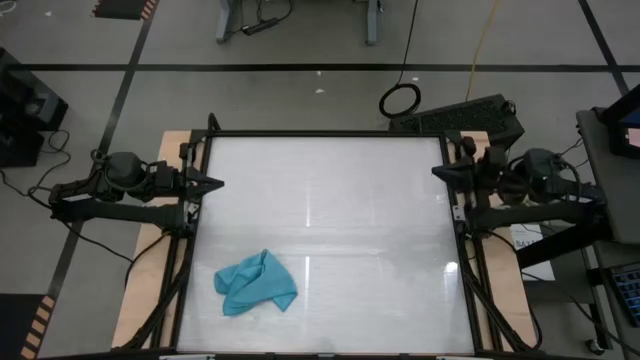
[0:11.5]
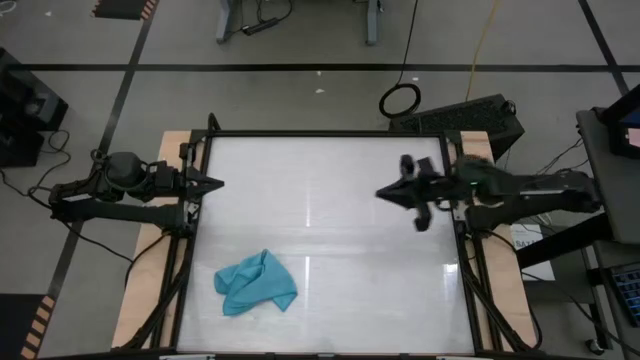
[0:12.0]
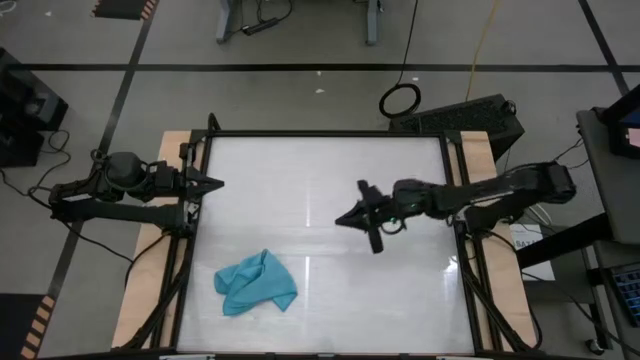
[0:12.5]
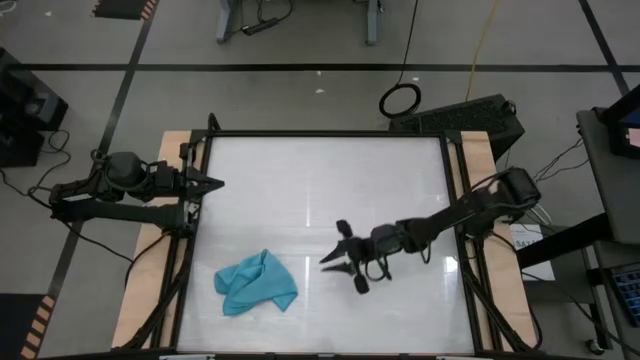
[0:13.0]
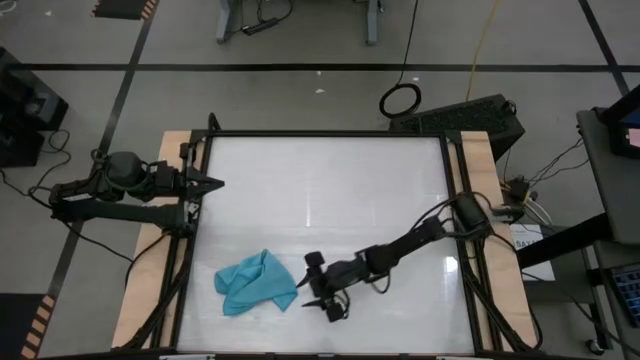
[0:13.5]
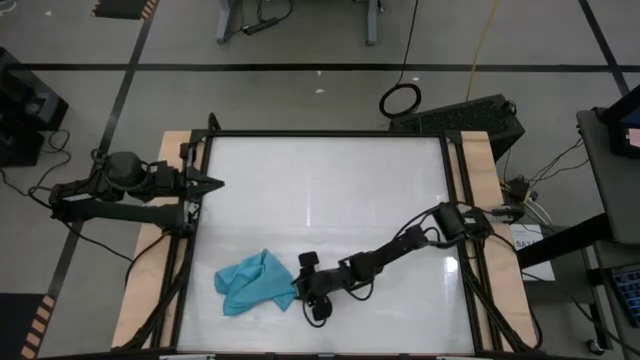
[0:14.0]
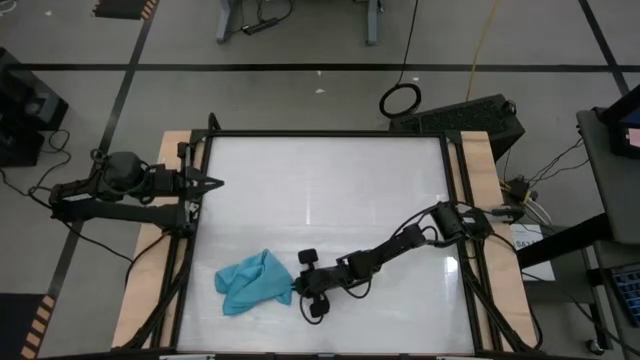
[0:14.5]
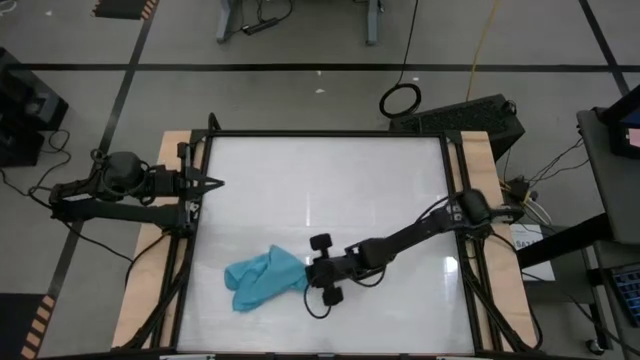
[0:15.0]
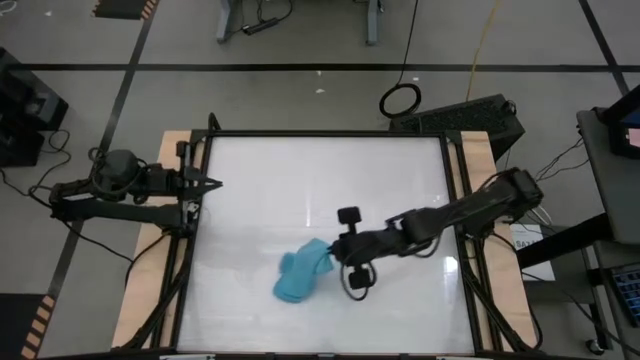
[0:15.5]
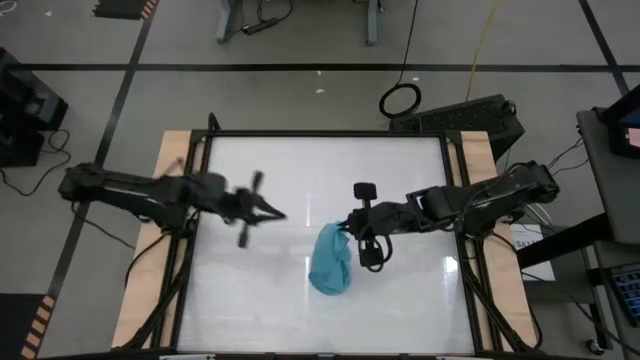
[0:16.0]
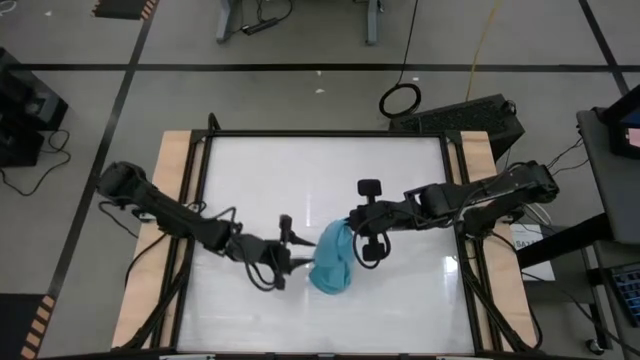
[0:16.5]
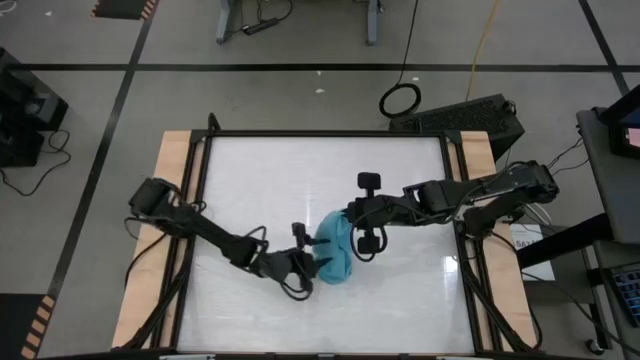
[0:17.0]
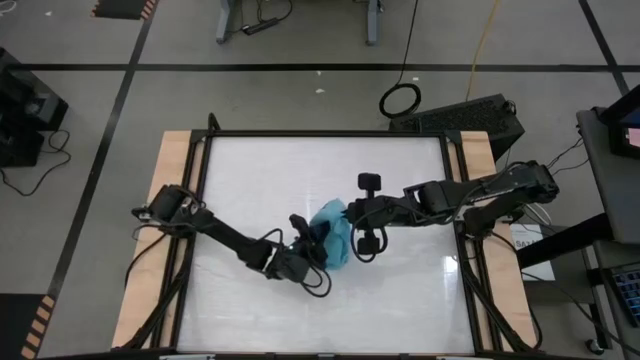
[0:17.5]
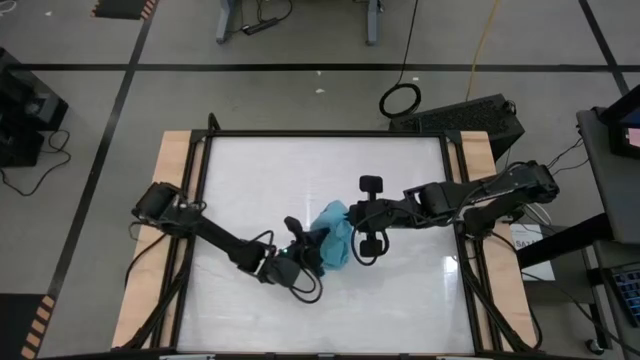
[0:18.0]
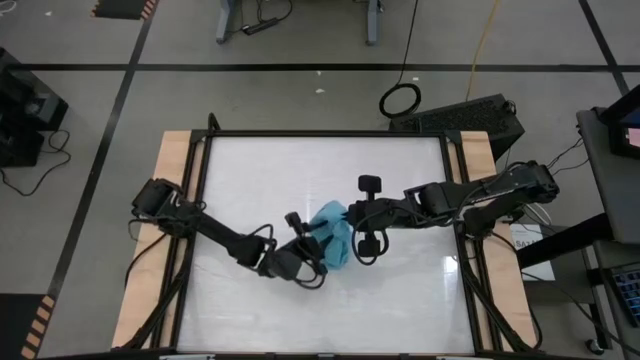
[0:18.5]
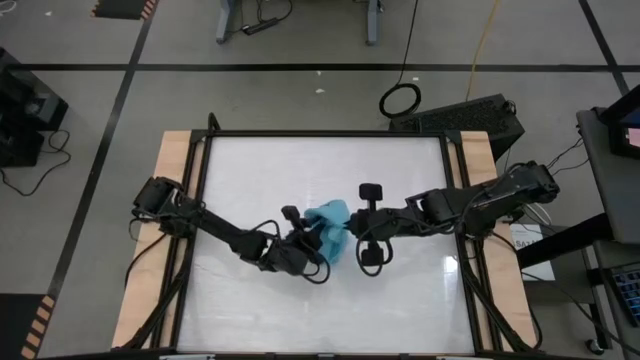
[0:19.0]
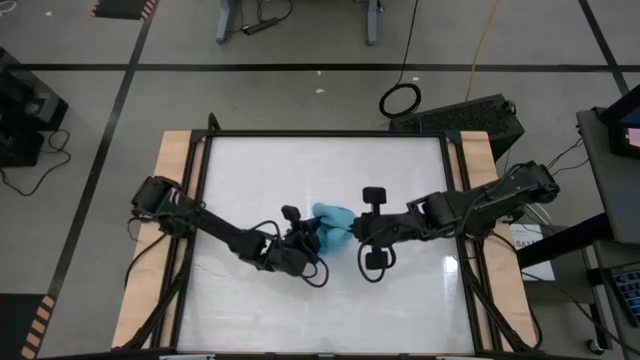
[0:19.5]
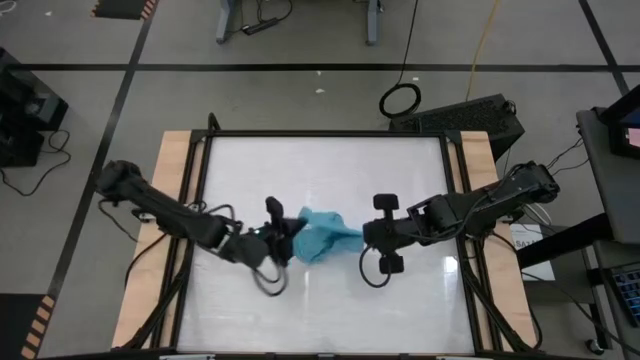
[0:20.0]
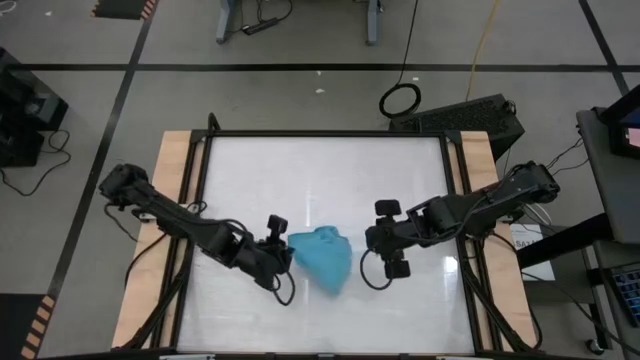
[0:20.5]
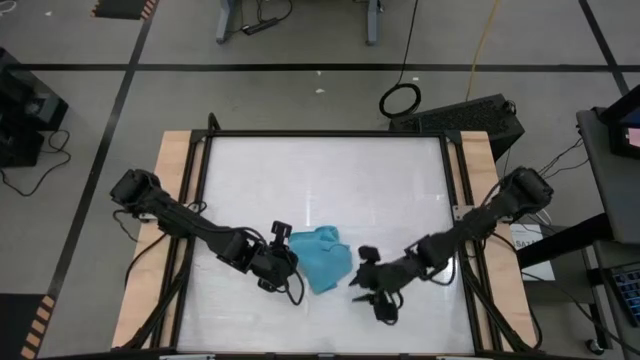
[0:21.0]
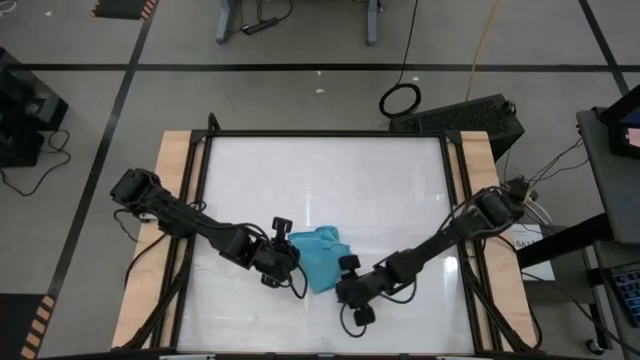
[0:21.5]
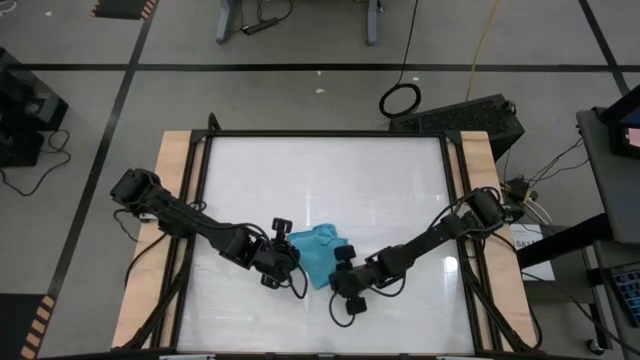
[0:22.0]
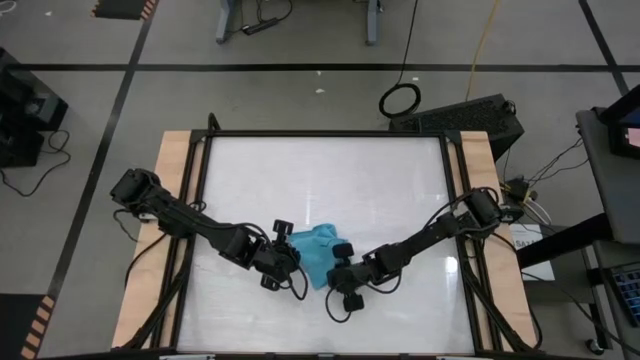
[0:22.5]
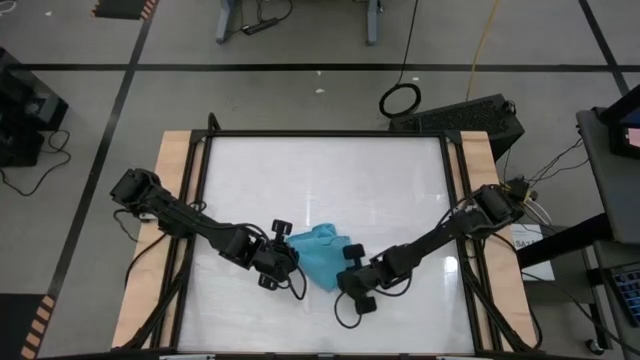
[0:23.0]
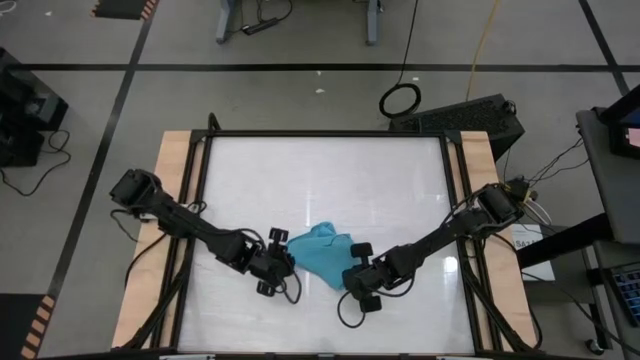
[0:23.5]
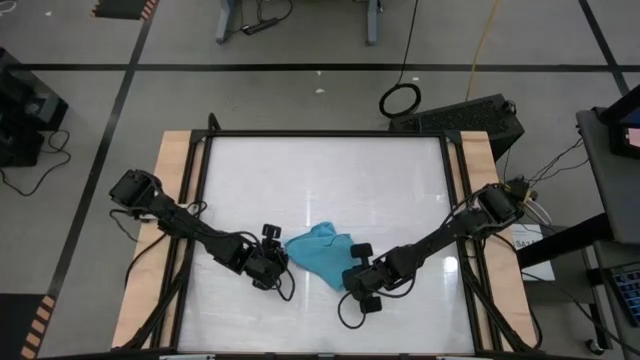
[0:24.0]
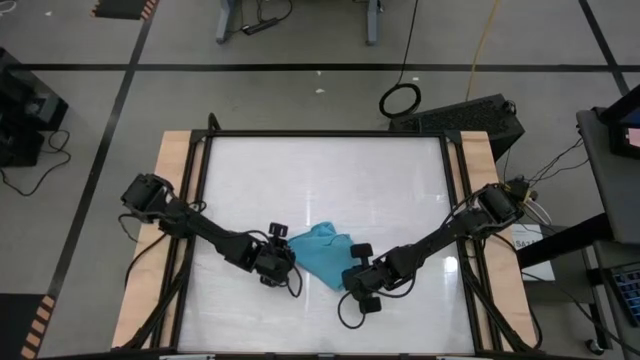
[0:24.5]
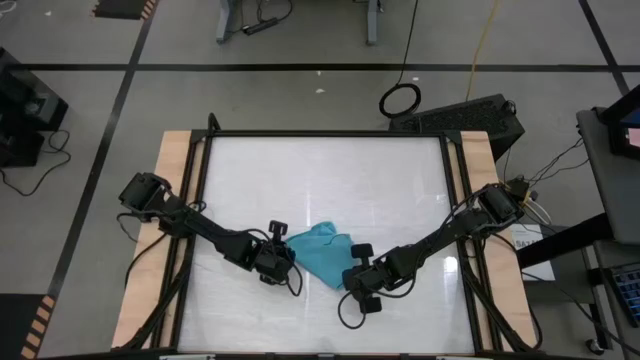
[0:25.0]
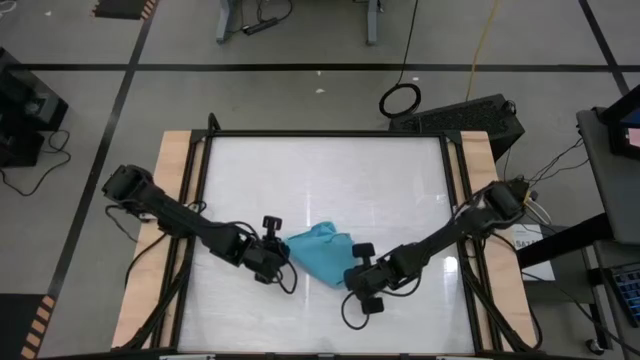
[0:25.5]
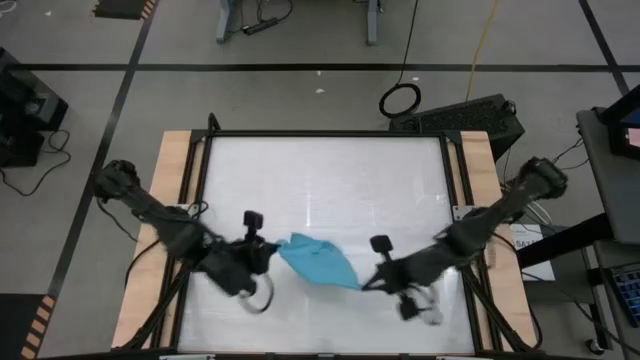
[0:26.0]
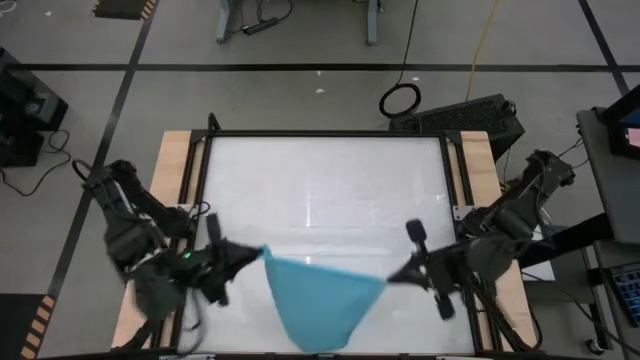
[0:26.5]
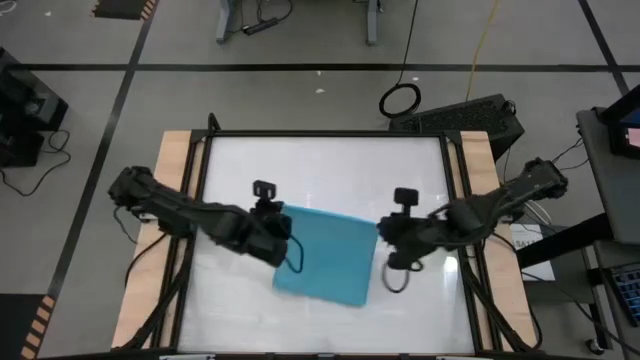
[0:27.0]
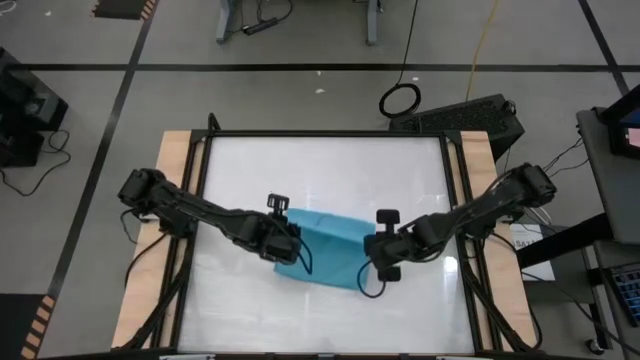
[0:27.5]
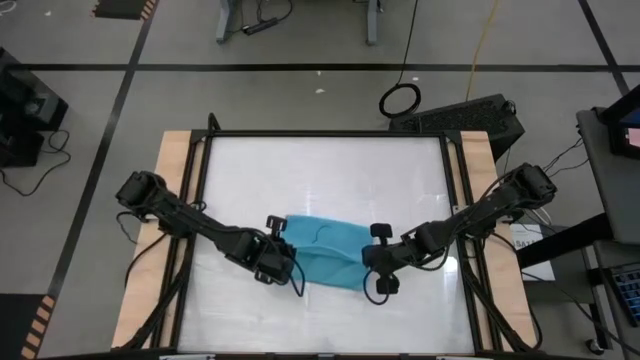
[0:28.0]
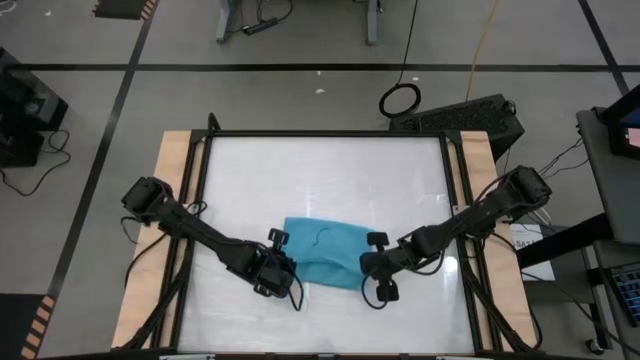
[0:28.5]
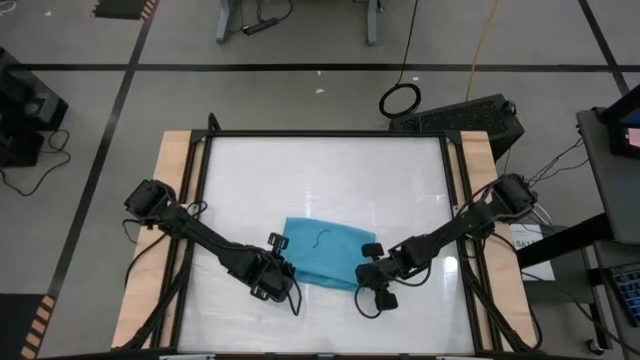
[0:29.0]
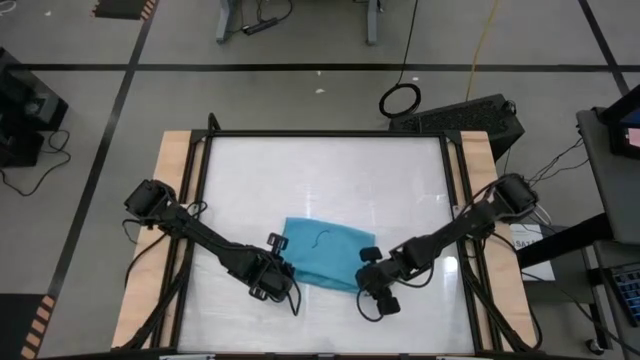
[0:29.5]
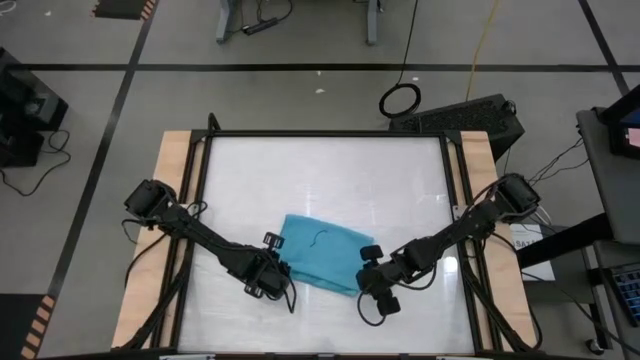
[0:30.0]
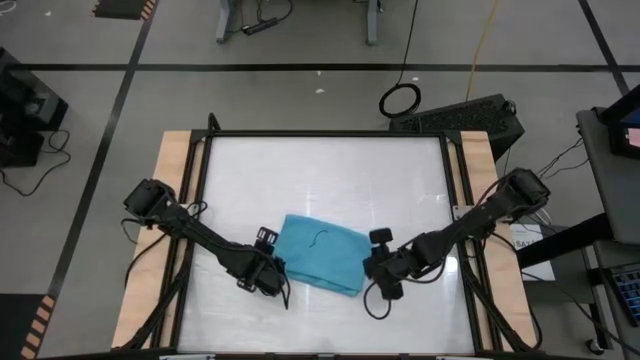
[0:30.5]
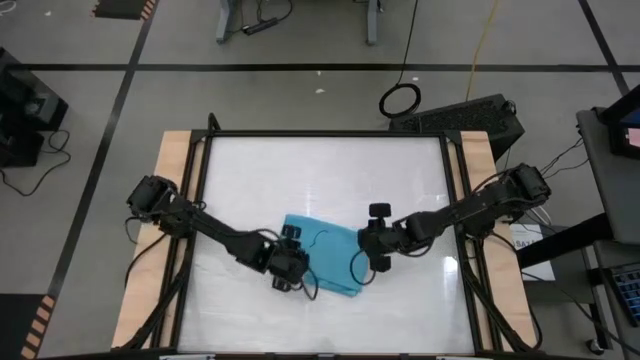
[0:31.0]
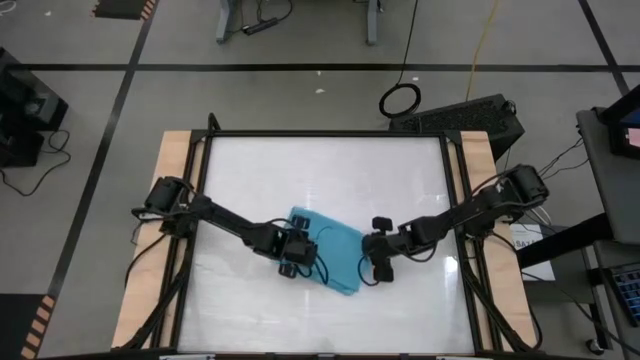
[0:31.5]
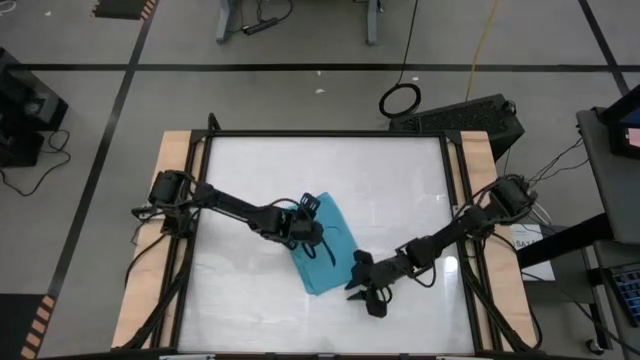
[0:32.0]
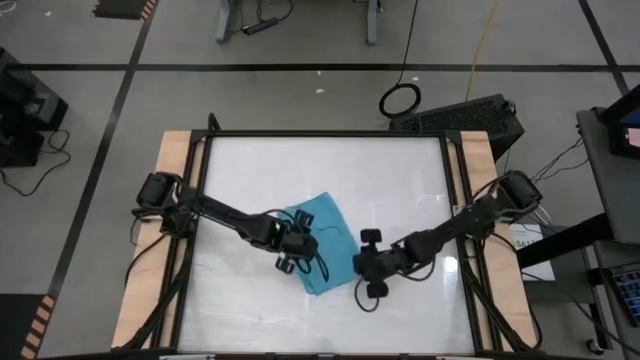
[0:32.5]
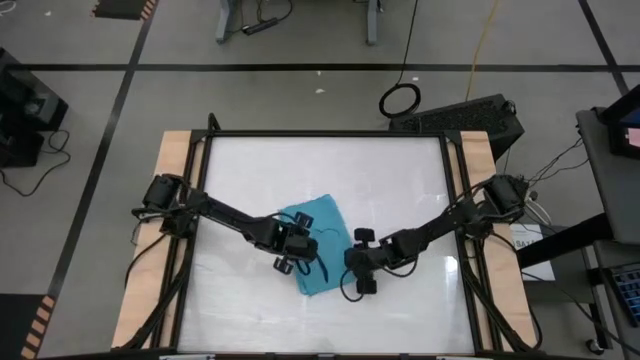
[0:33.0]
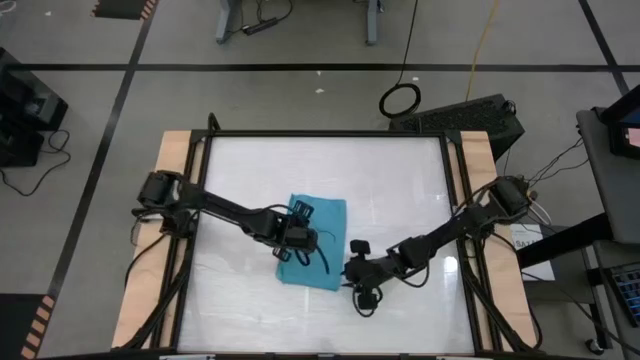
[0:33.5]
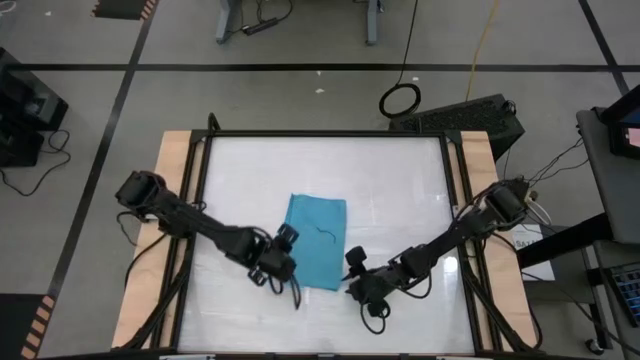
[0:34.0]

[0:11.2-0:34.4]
Task: Roll towel
Roll the blue towel
